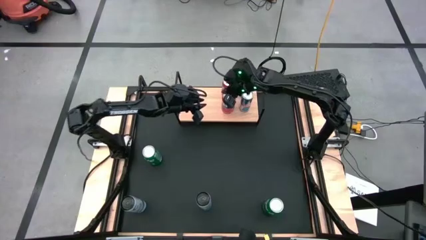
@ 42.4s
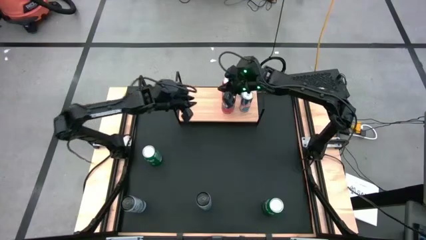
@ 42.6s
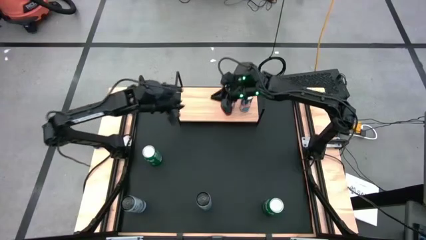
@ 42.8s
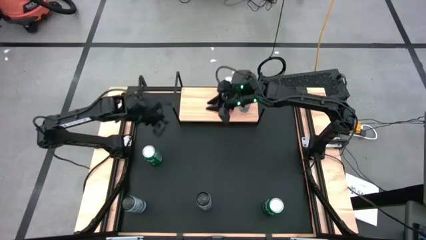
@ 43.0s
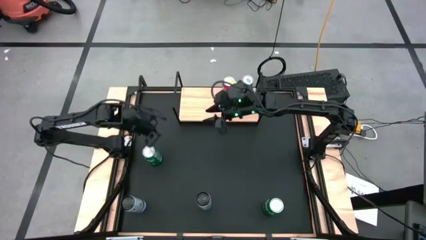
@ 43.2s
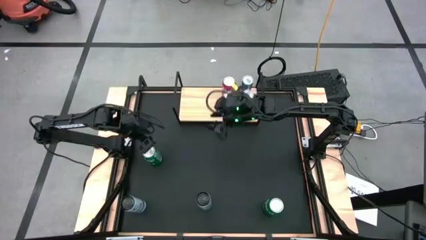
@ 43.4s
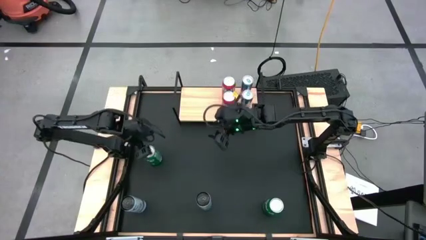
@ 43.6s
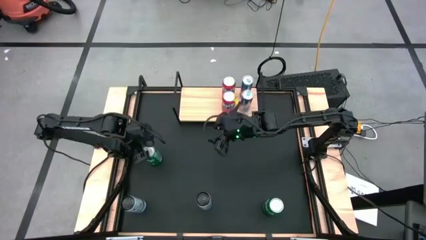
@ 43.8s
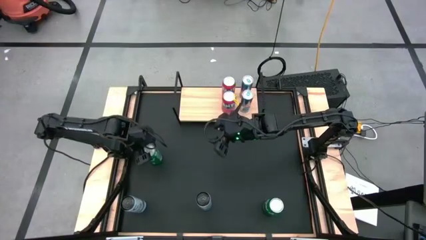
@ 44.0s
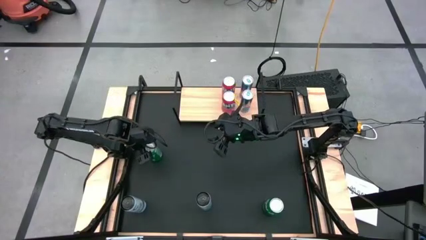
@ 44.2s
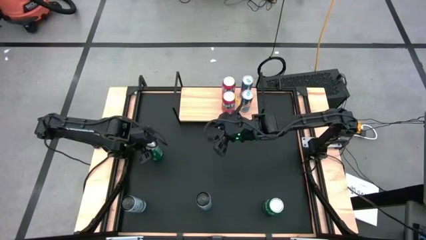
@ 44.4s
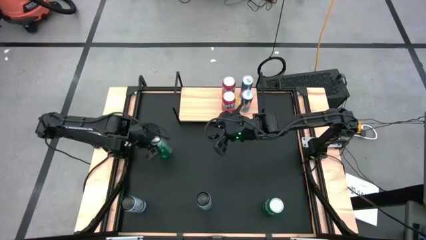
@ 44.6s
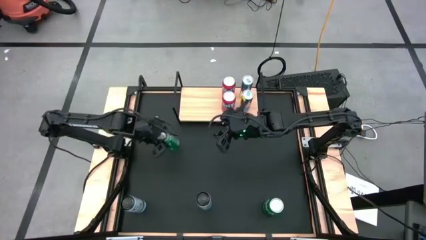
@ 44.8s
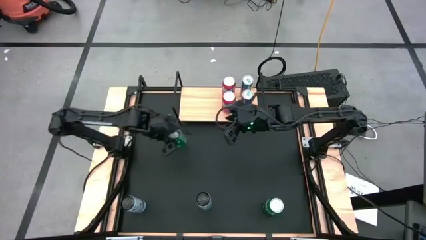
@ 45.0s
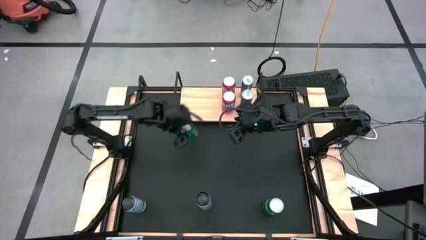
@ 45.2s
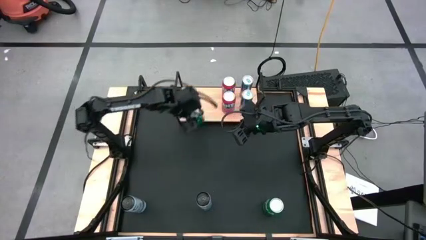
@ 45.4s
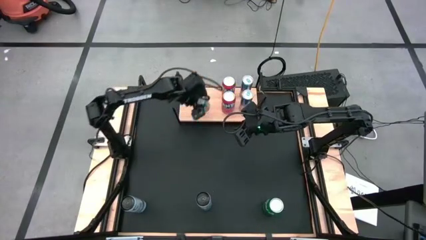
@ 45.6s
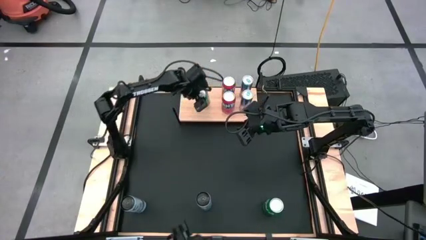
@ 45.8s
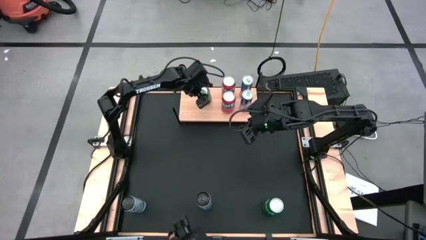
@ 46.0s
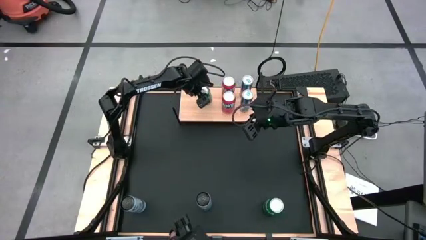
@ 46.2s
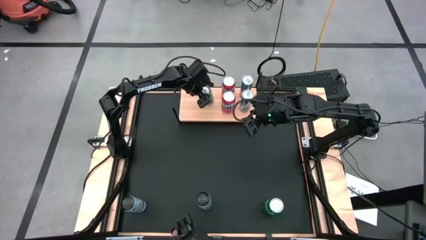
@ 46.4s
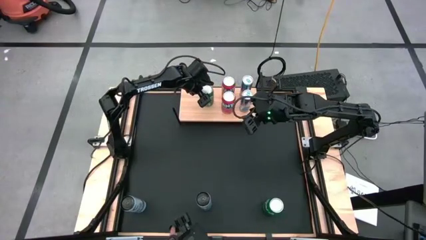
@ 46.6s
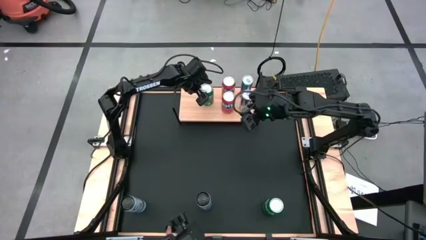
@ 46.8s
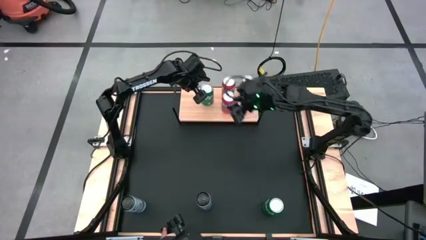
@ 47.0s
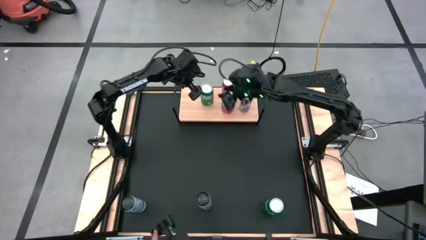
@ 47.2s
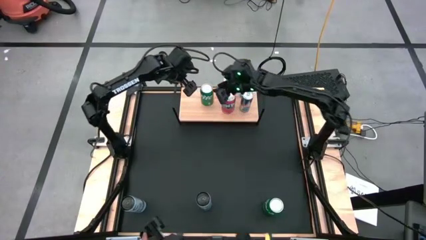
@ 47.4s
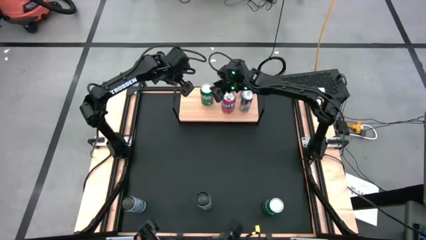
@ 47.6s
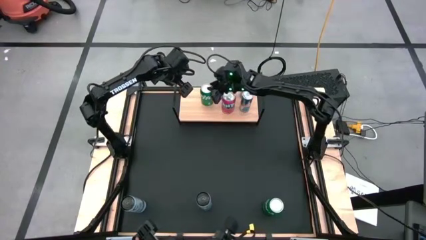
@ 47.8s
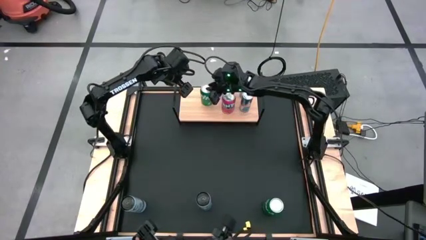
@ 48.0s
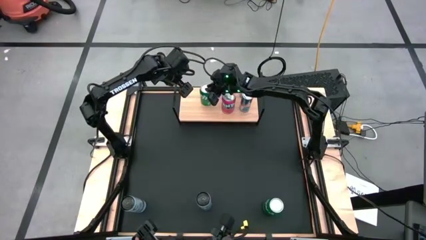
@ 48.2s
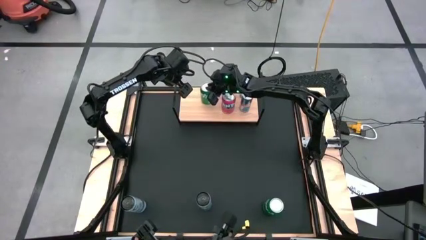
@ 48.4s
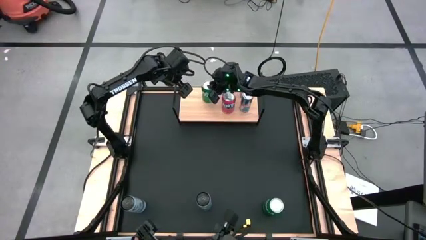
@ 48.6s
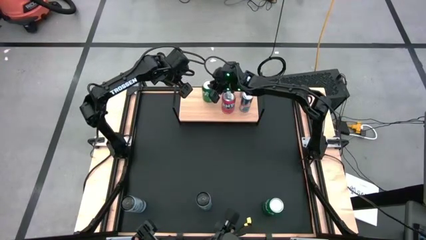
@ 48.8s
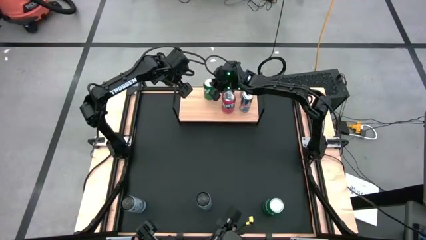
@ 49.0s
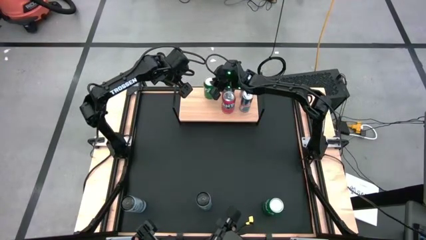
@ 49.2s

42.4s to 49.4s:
Task: Place canned beverage on shelf
Put the left green soda can on the shelf

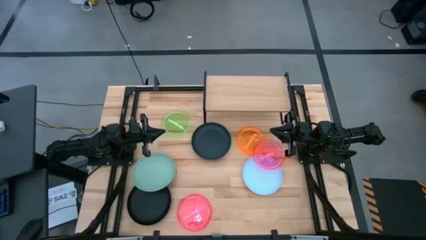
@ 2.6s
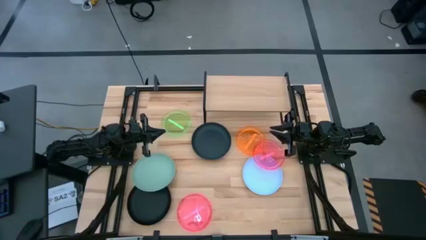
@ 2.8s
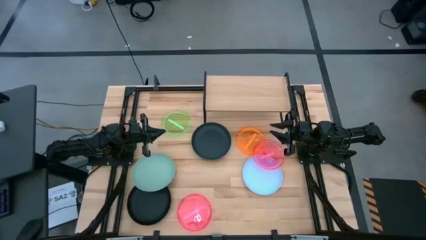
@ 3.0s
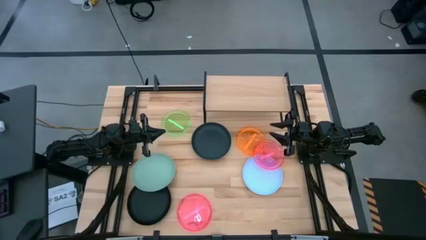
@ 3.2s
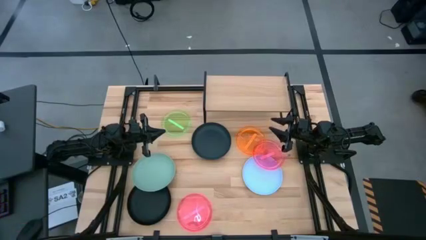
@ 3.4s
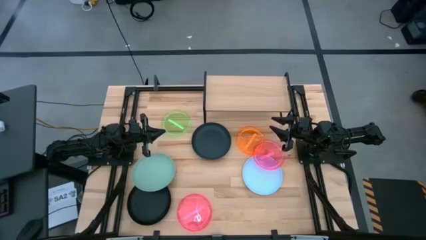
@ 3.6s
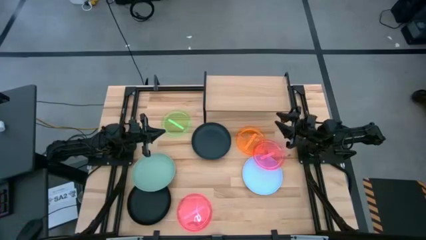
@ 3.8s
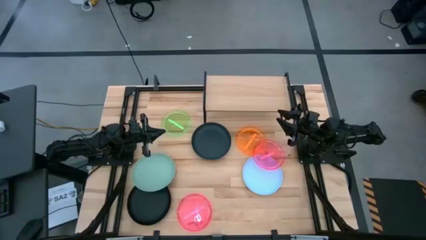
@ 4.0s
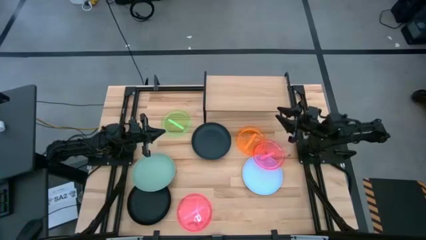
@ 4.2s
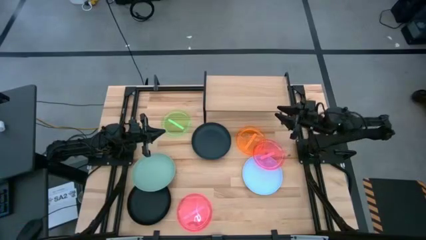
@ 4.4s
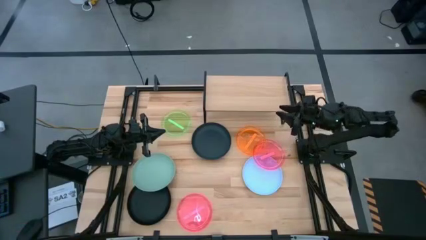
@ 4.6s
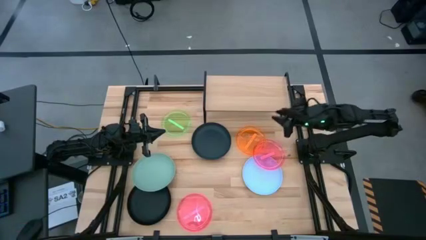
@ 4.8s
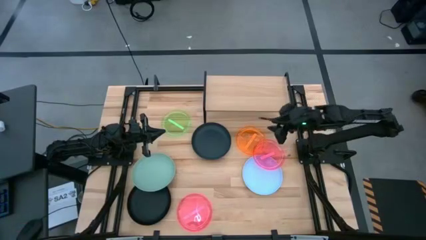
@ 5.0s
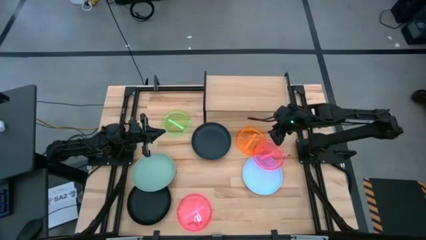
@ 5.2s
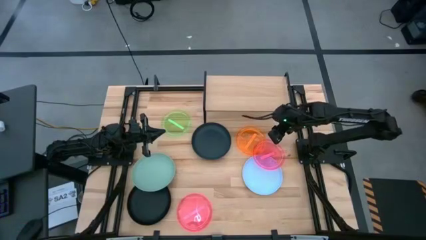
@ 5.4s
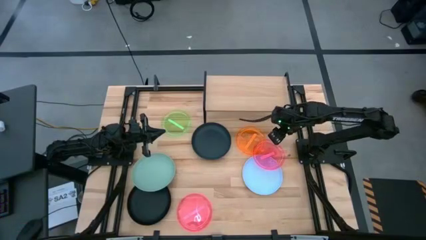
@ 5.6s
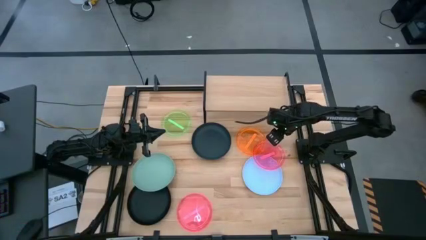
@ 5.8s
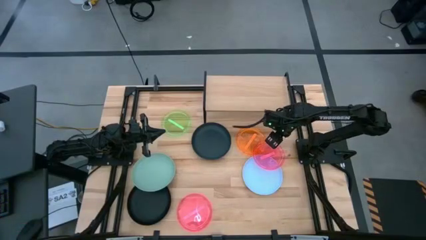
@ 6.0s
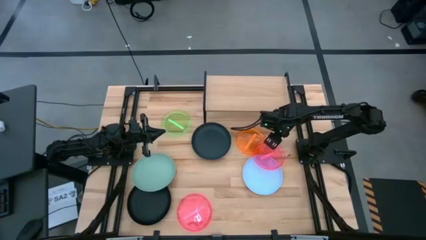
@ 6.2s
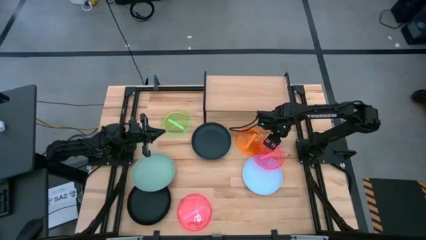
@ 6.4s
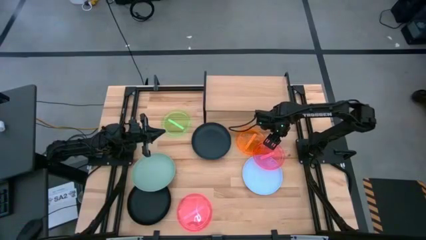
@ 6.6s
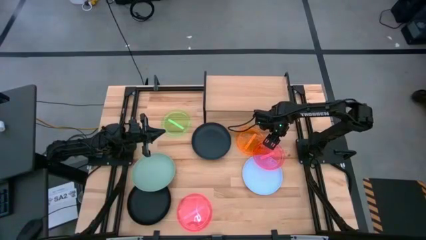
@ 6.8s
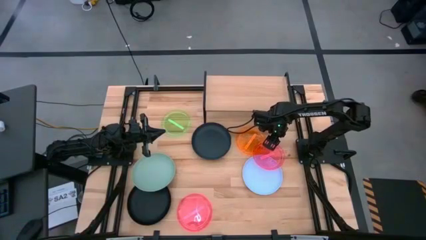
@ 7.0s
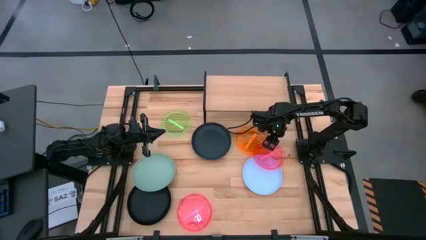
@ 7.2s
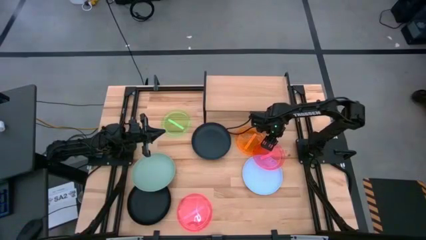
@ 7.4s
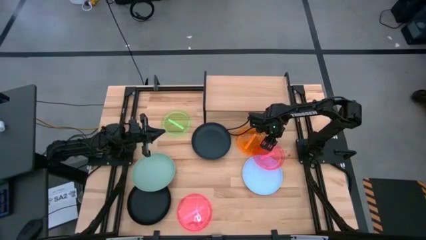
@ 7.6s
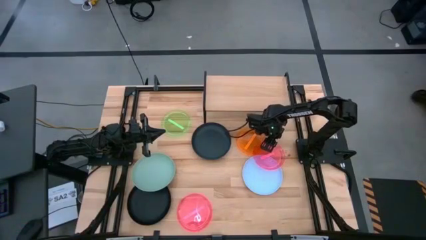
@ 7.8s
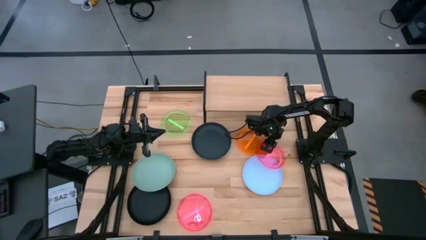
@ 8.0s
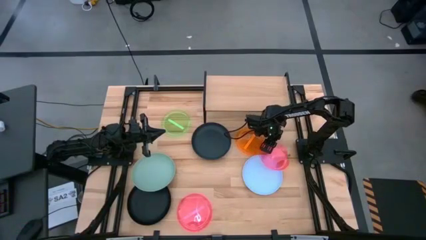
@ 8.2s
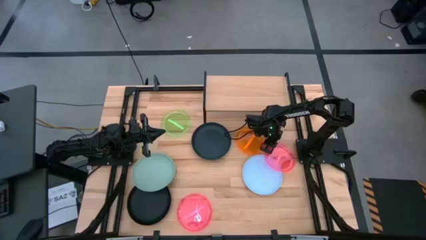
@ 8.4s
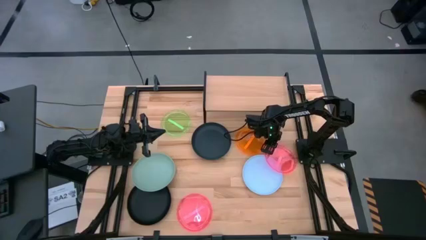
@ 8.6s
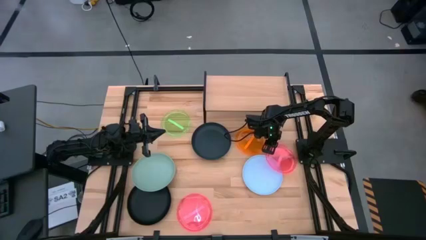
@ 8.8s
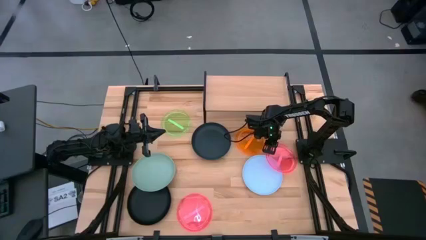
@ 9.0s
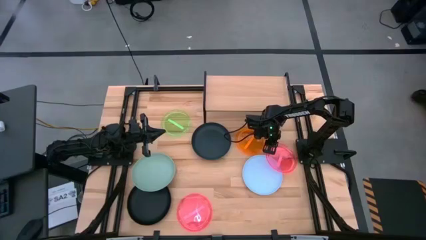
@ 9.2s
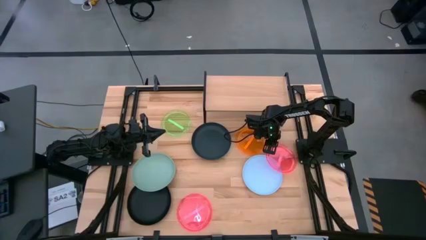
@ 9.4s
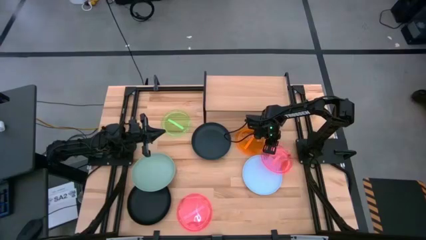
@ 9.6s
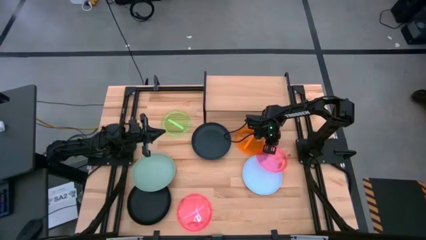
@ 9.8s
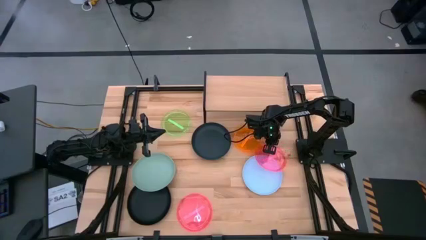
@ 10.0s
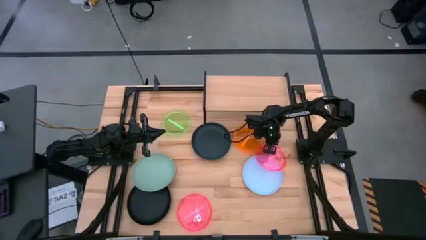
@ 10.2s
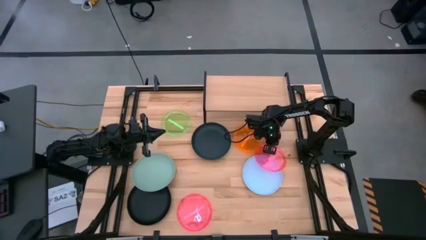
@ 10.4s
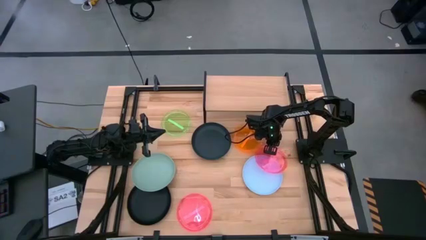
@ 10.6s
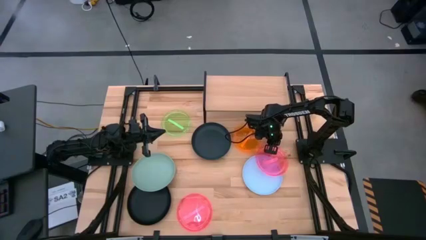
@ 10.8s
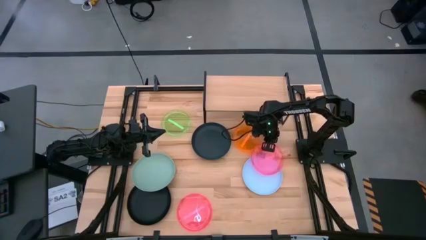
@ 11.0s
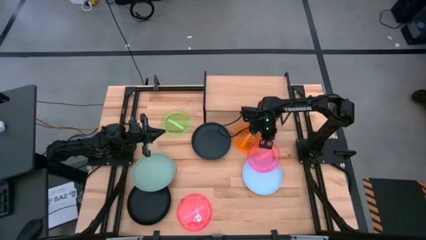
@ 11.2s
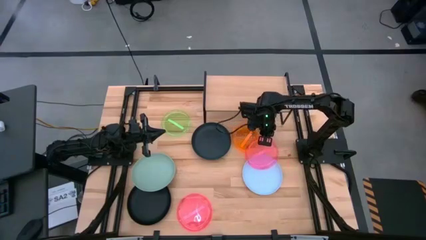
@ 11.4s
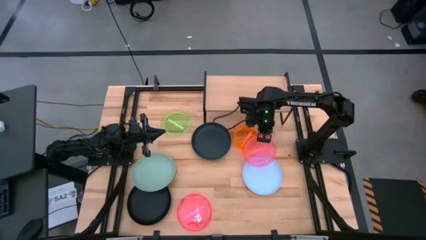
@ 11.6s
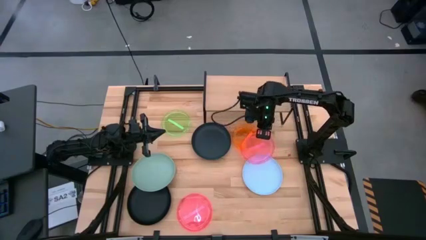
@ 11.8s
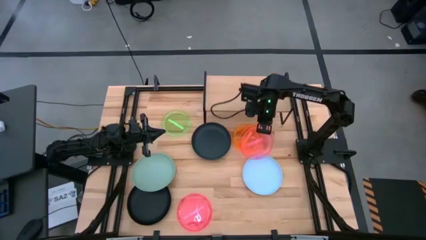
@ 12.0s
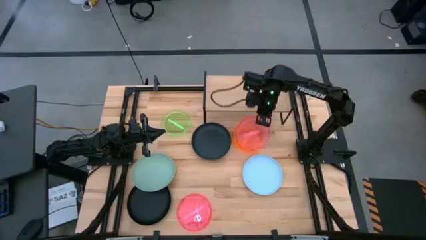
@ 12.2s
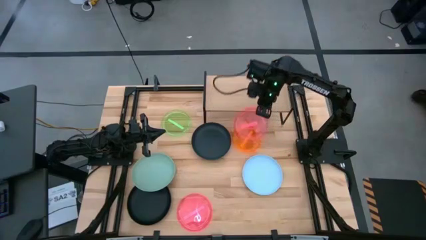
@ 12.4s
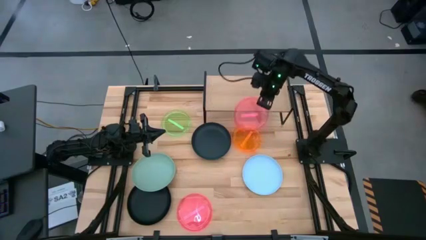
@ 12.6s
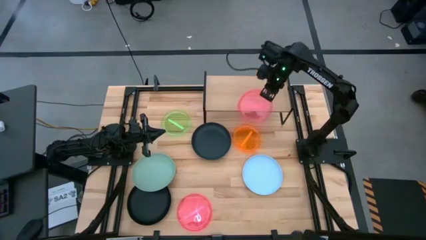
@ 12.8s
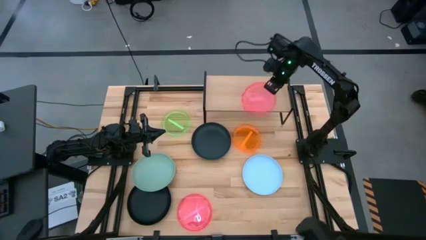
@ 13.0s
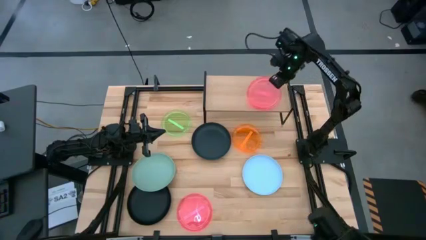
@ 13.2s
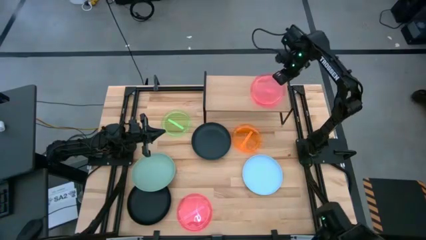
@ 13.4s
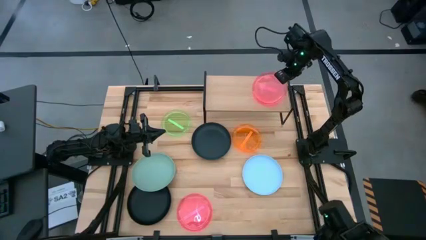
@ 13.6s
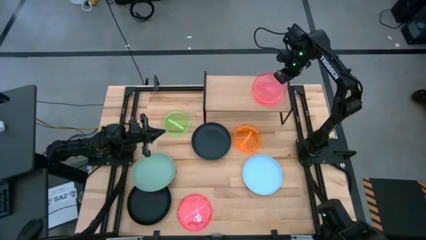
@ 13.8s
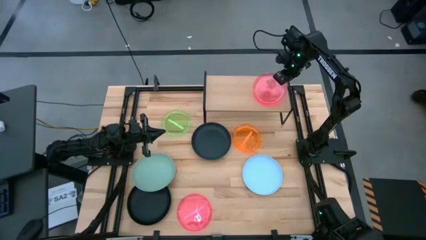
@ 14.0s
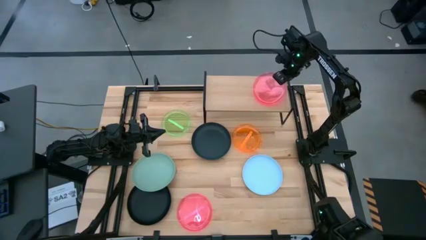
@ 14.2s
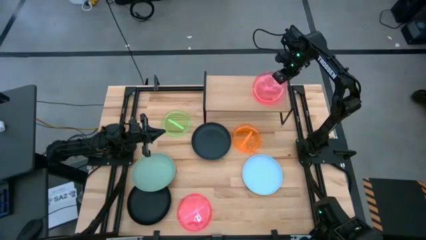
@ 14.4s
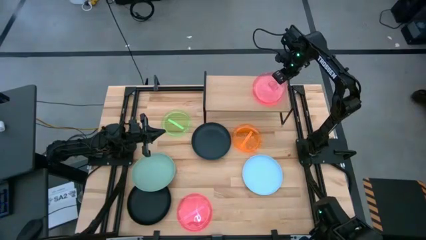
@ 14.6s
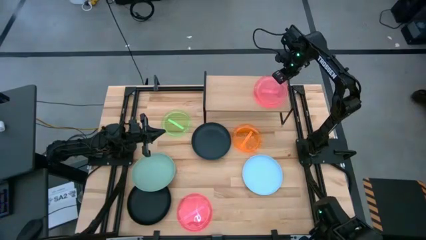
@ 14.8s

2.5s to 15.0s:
Task: Place and stack plates onto a shelf
Put the right pink plate on the shelf
